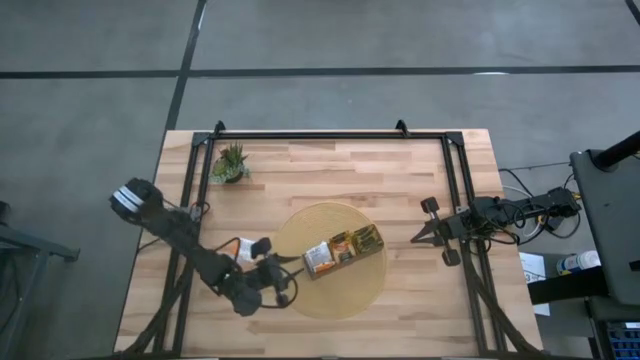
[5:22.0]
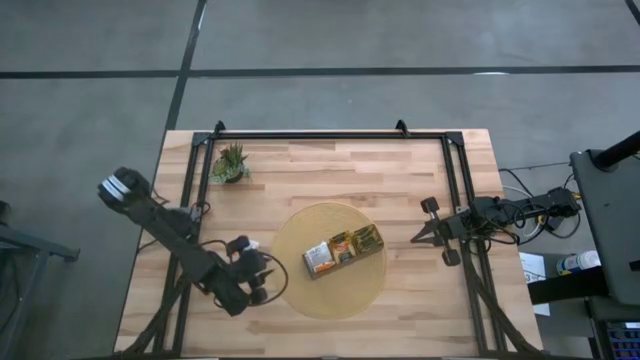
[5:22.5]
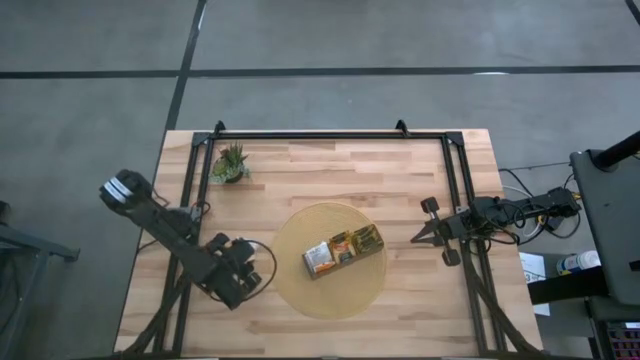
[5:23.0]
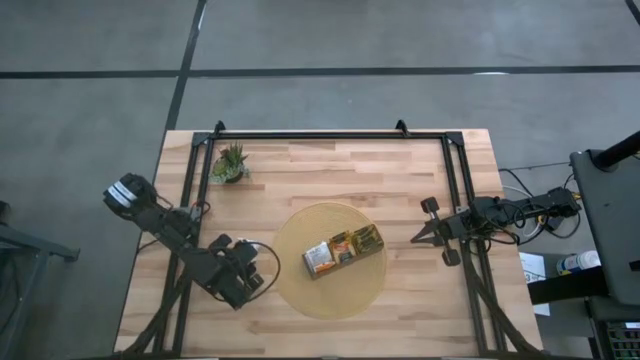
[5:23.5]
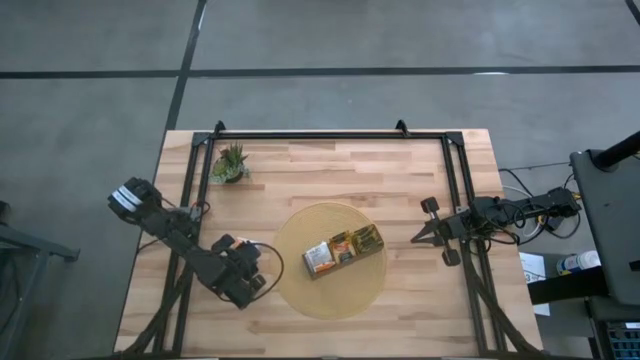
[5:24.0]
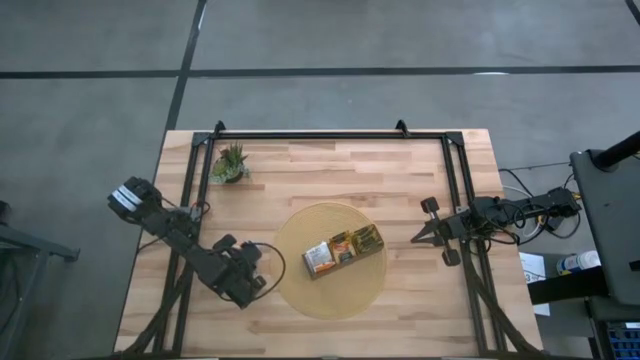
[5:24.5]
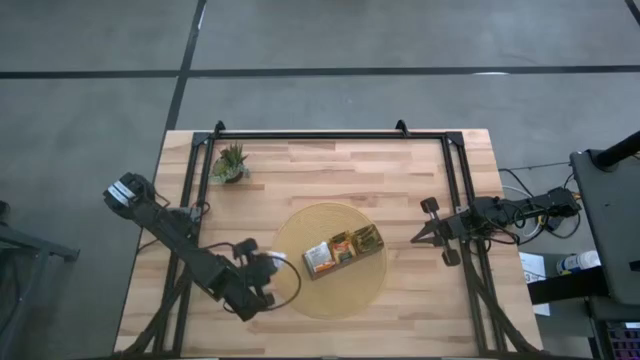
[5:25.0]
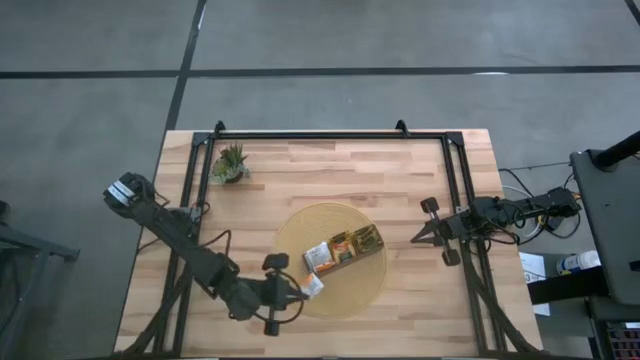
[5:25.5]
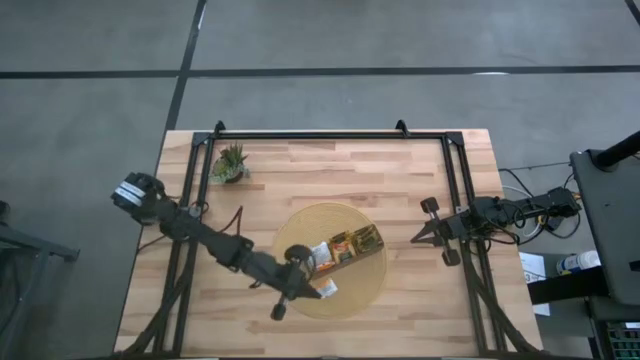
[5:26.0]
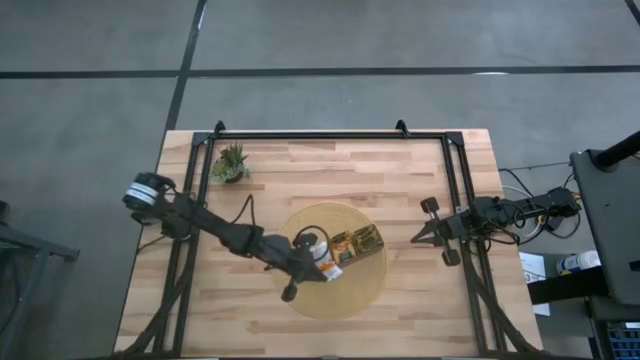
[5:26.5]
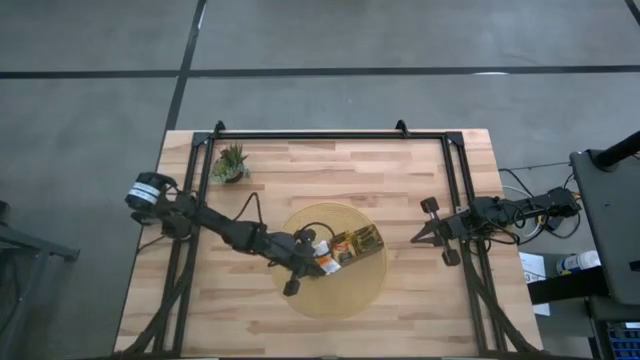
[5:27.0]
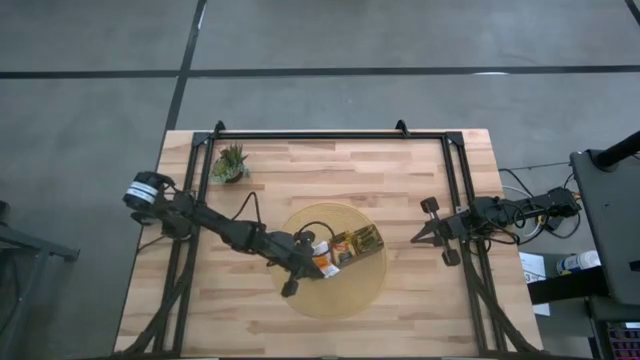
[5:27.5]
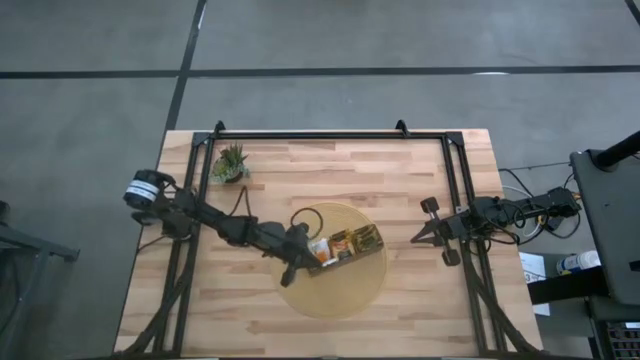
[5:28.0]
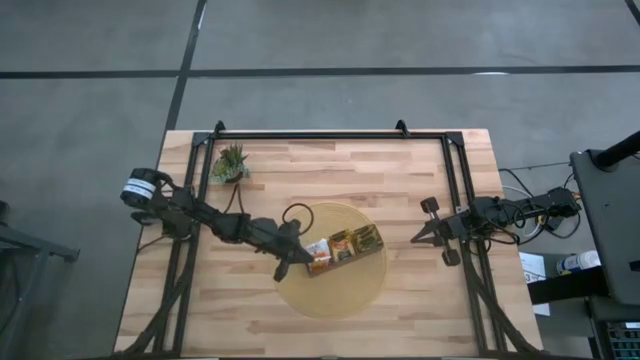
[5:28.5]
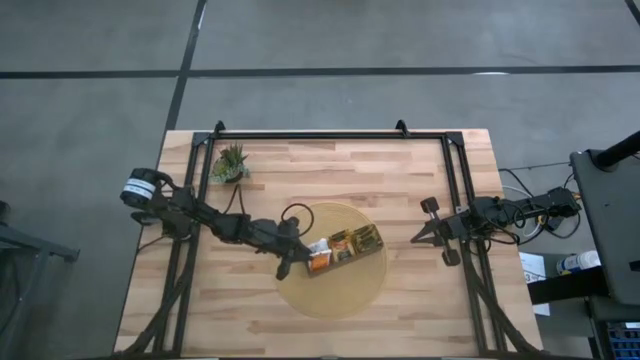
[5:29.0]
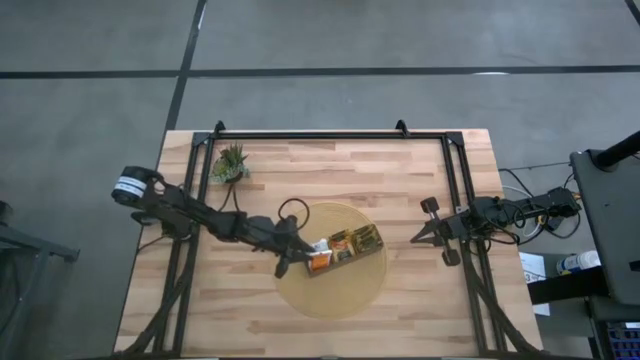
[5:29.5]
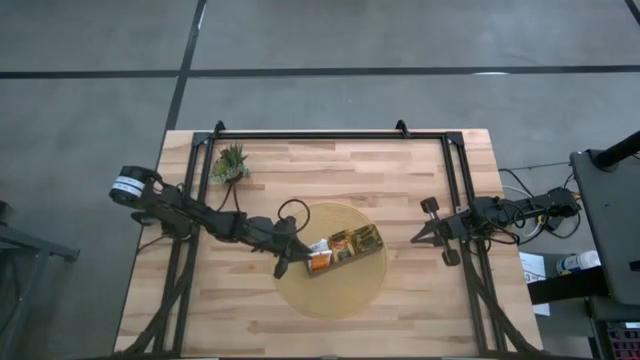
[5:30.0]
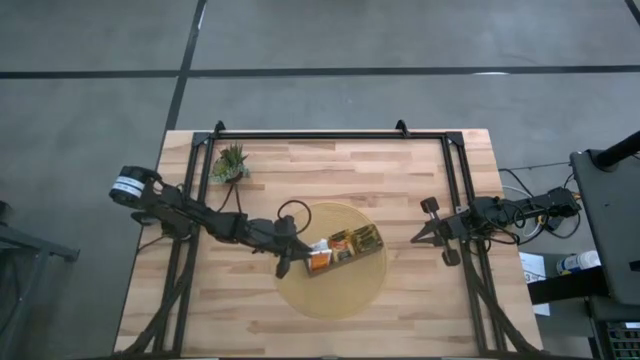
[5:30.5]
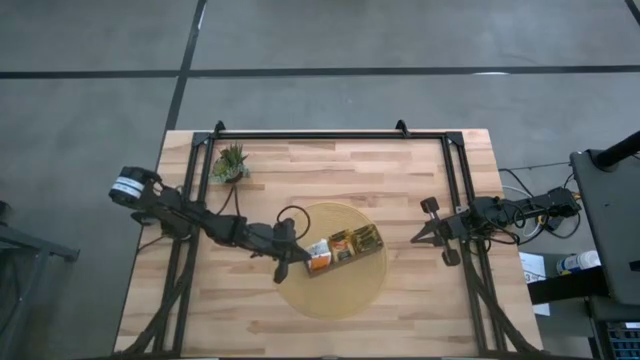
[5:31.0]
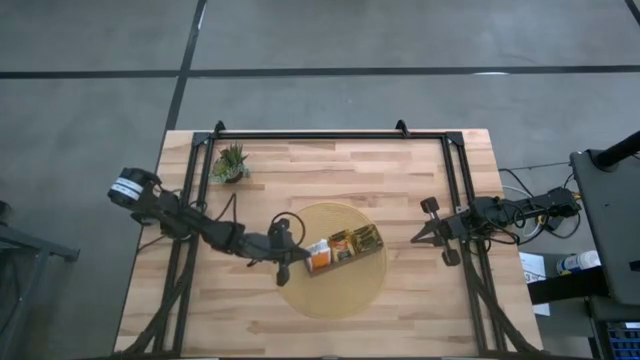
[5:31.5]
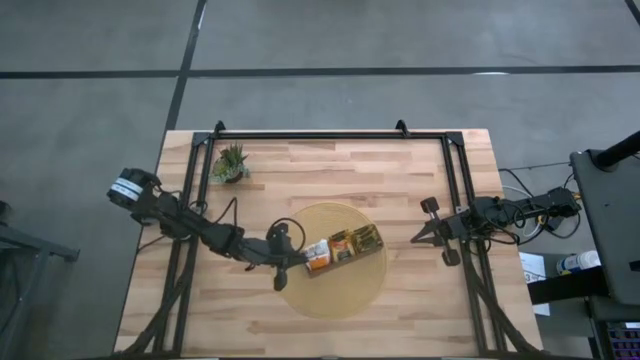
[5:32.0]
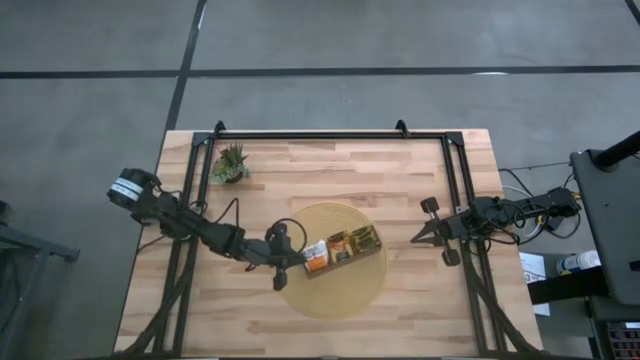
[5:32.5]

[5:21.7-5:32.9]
Task: Pick & Place Tea
Put the white tea bag into the left of the wooden organizer

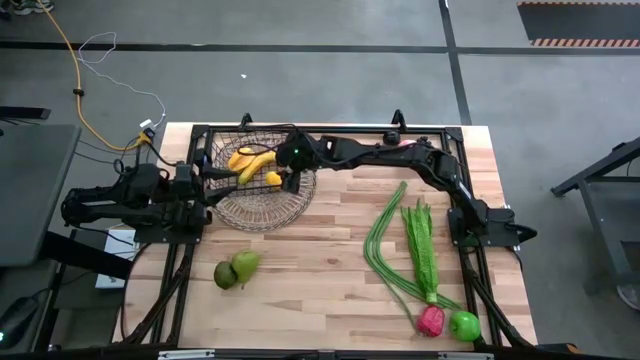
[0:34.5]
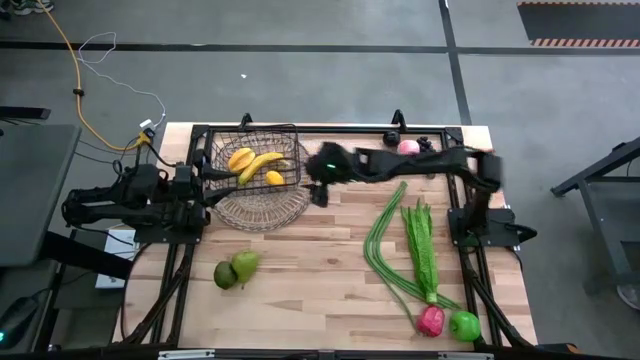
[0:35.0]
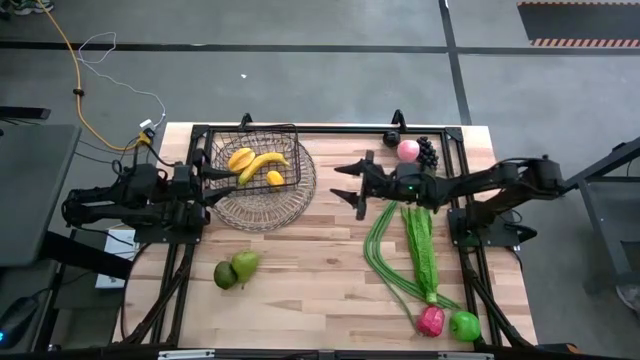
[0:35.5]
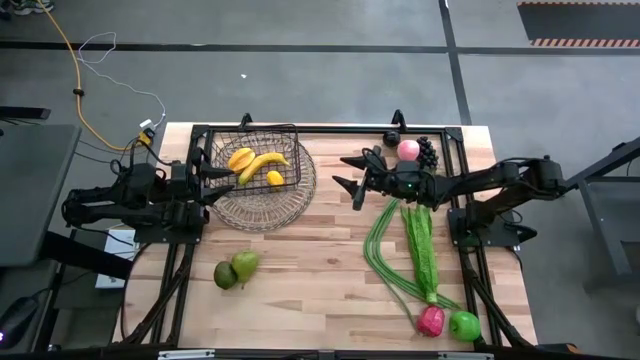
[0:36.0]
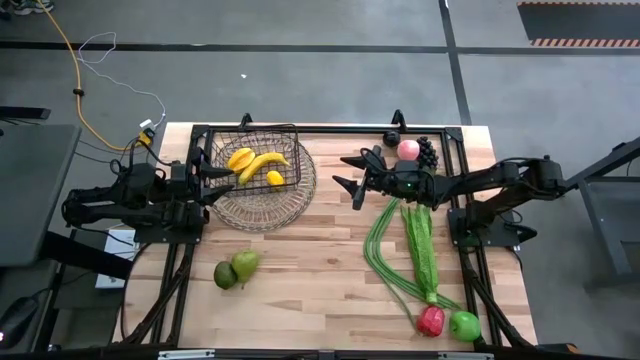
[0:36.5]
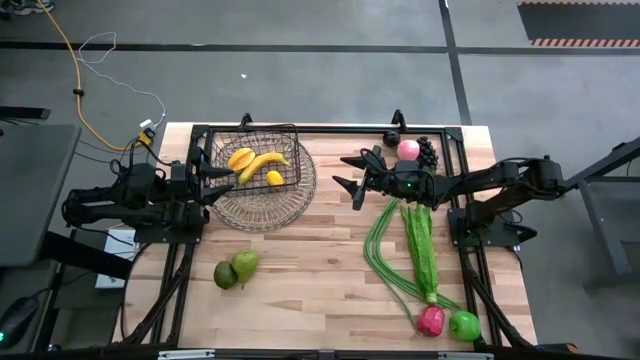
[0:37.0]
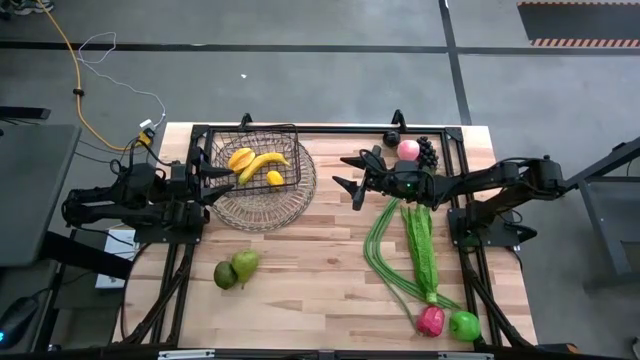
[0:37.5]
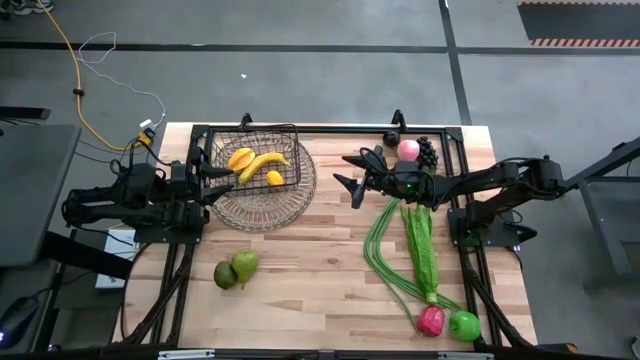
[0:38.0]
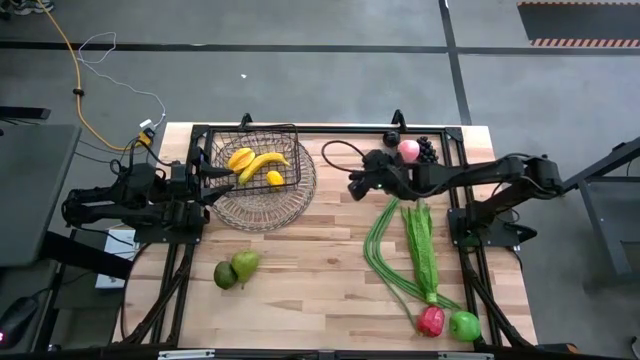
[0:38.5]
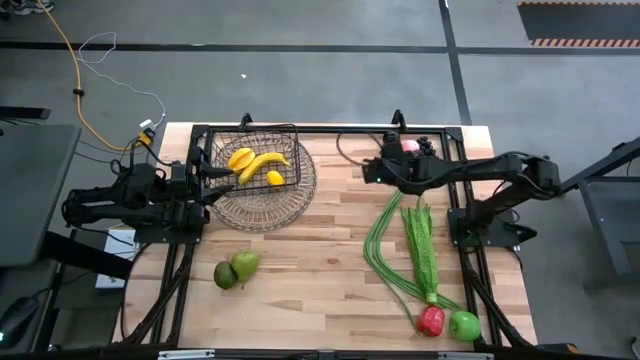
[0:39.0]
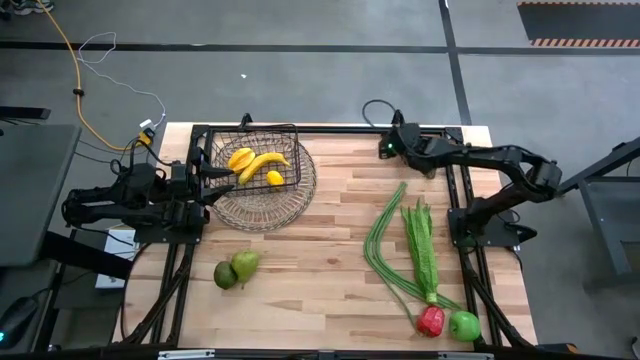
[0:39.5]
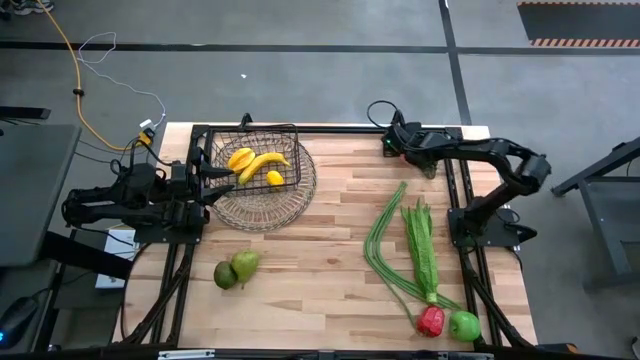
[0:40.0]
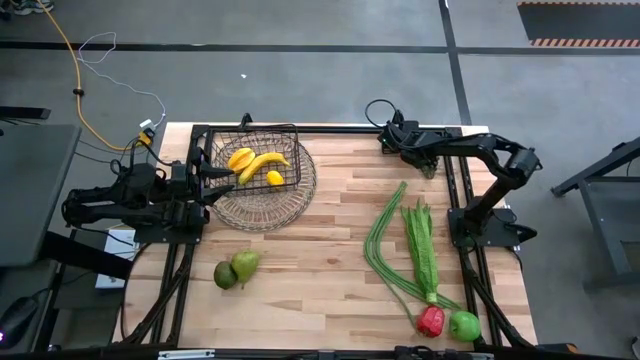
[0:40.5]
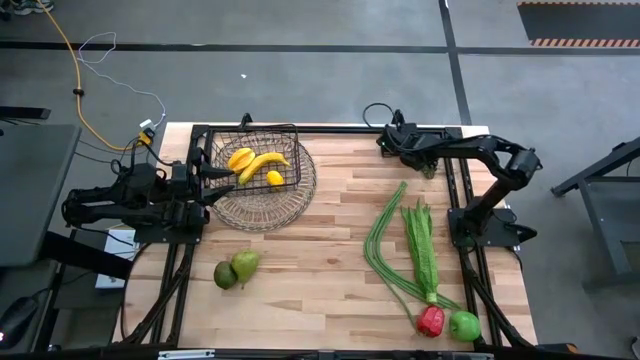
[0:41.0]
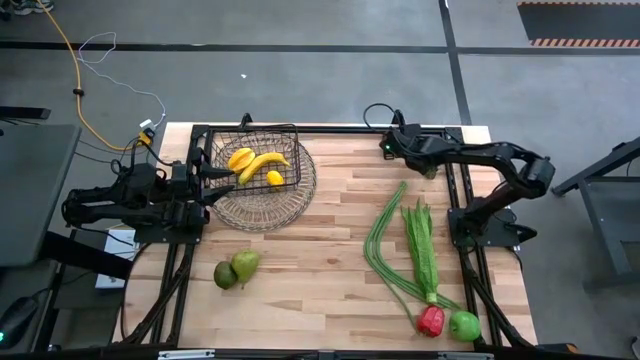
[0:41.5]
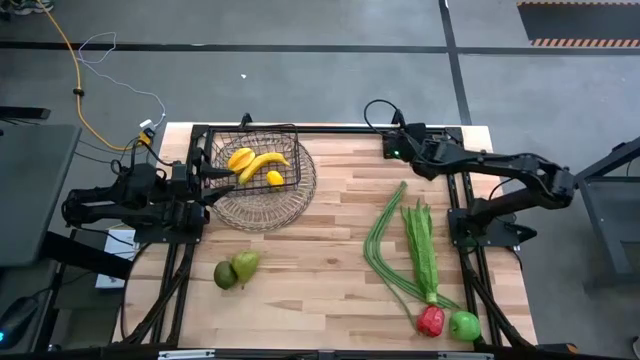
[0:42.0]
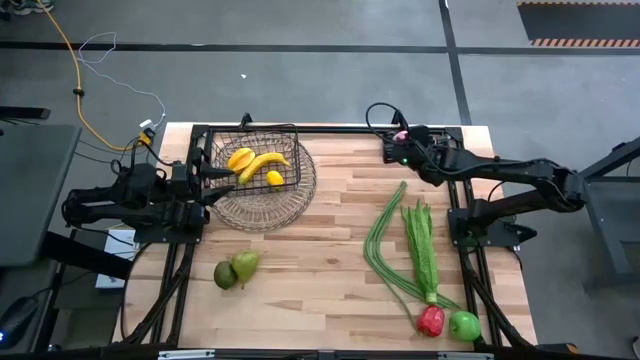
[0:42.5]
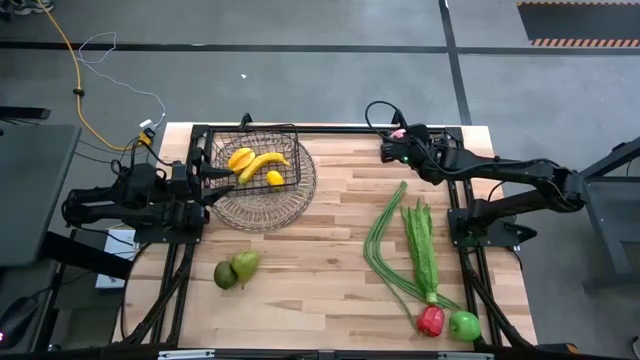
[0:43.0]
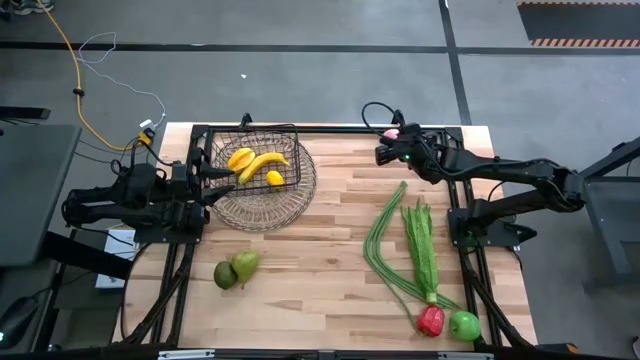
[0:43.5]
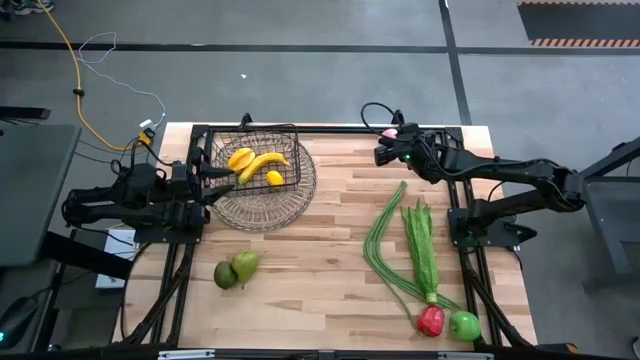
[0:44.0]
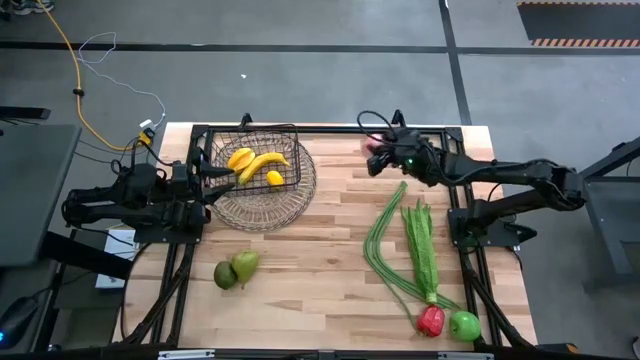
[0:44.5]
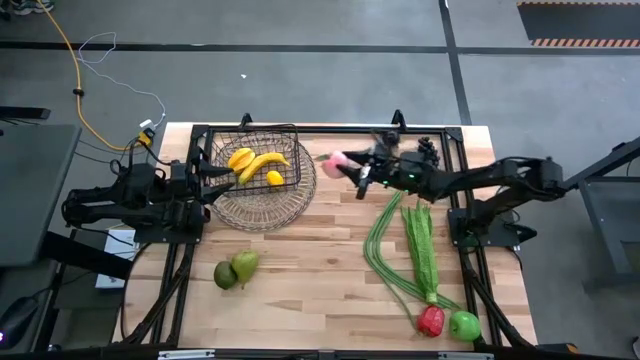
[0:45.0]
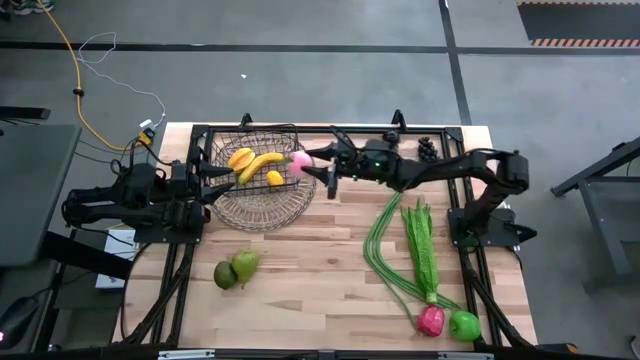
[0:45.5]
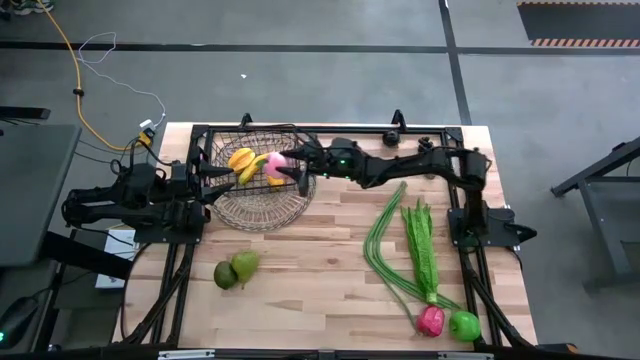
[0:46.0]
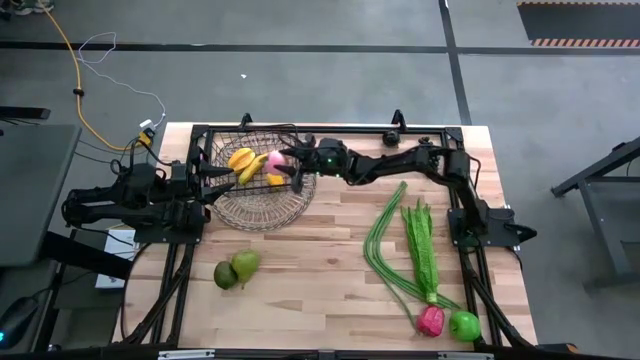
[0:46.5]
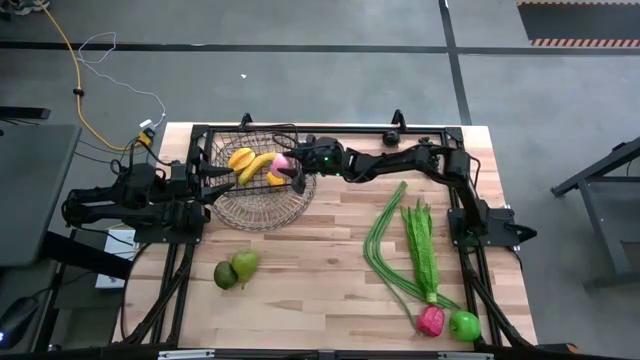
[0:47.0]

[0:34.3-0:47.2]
Task: Build produce basket
Put the pink peach into the wire basket
